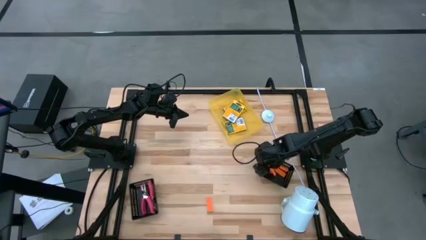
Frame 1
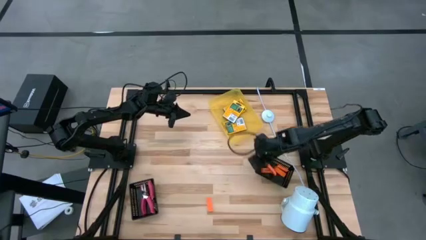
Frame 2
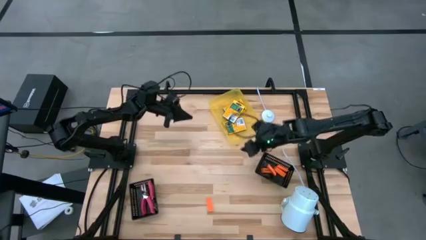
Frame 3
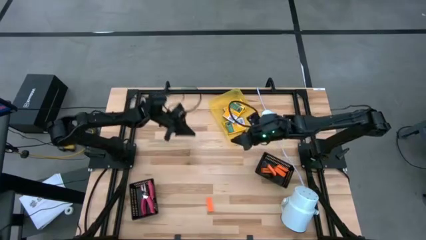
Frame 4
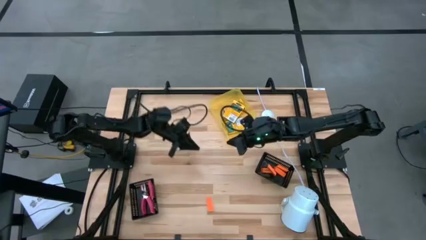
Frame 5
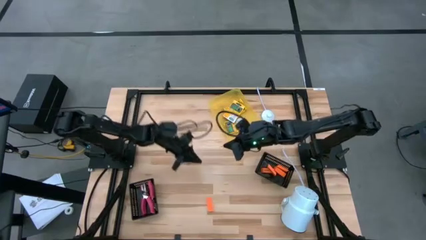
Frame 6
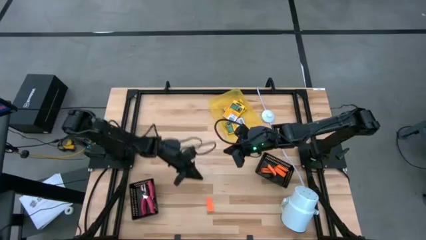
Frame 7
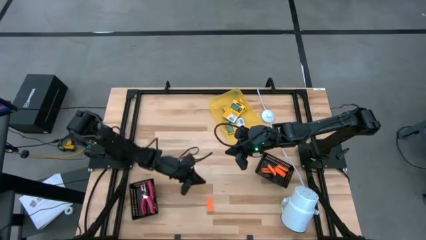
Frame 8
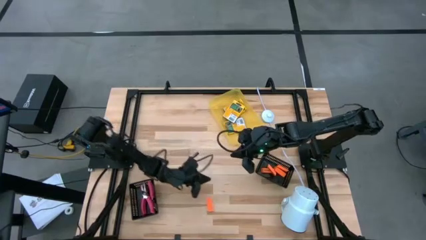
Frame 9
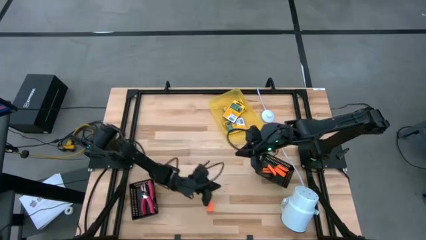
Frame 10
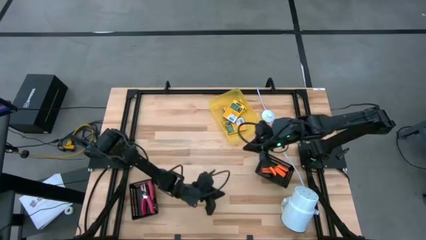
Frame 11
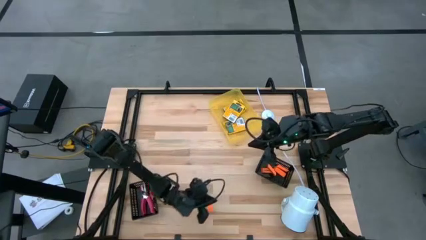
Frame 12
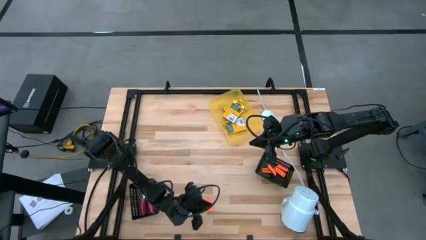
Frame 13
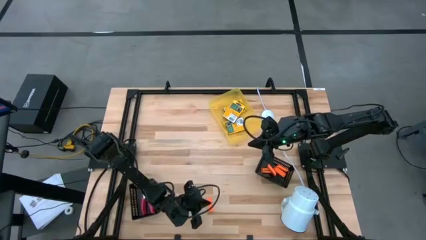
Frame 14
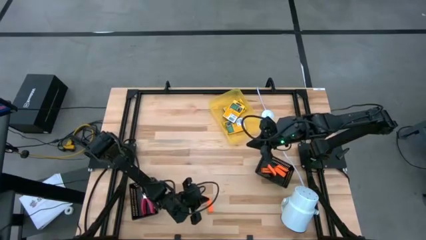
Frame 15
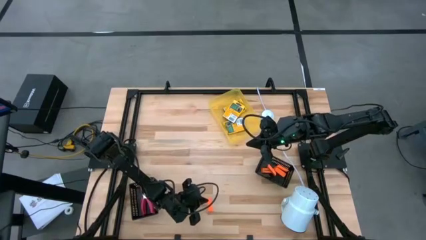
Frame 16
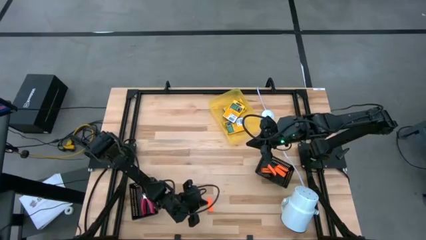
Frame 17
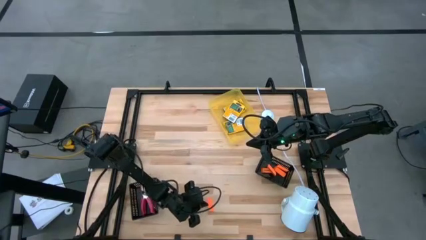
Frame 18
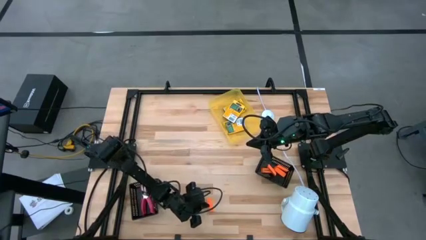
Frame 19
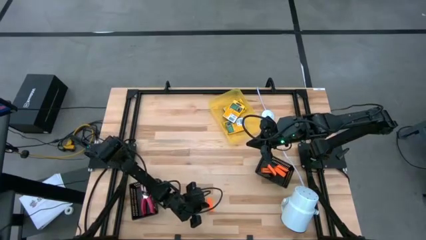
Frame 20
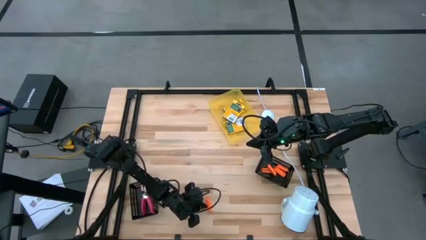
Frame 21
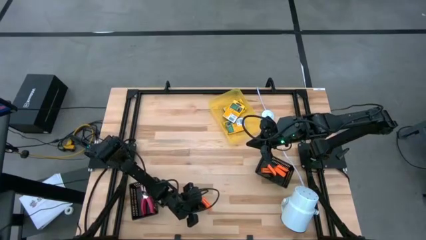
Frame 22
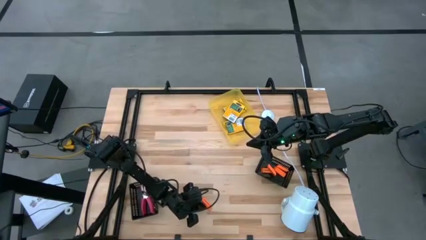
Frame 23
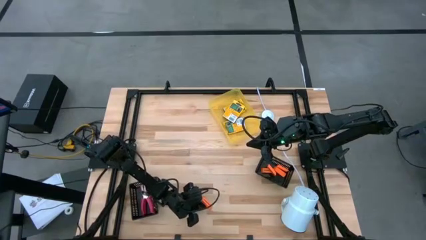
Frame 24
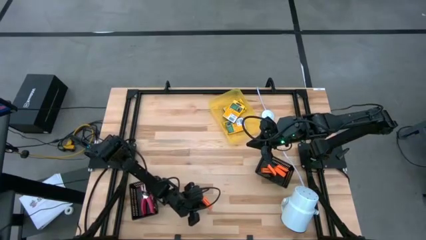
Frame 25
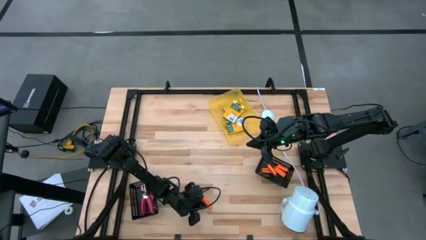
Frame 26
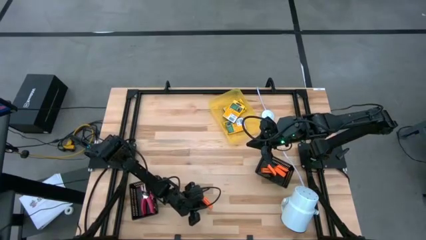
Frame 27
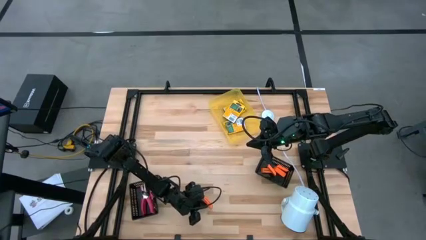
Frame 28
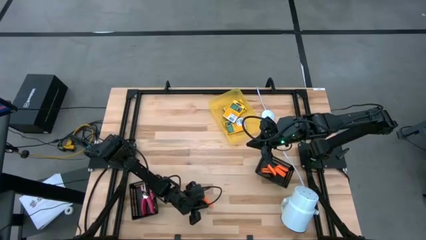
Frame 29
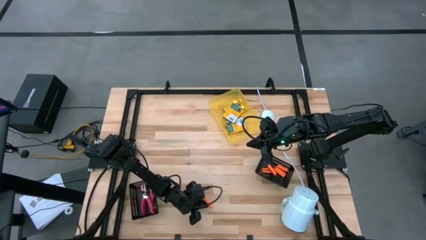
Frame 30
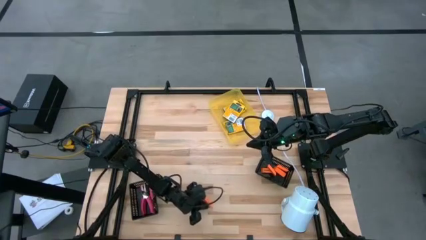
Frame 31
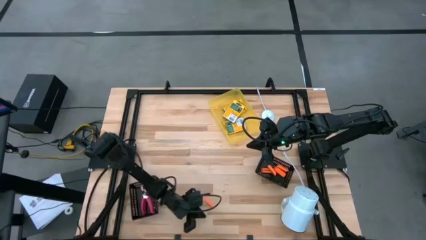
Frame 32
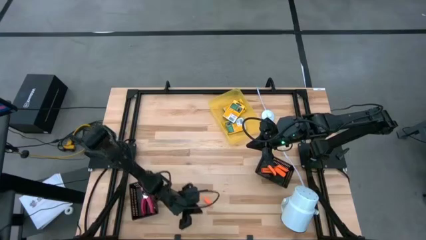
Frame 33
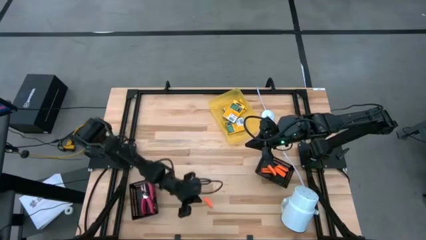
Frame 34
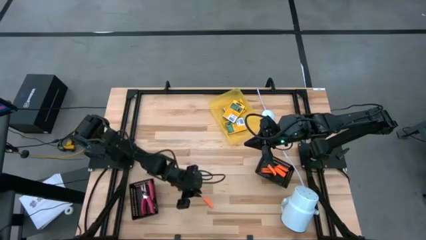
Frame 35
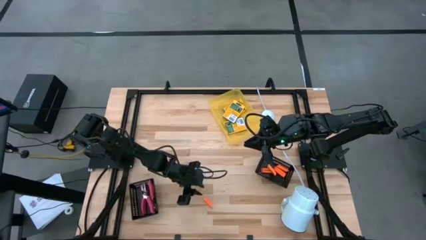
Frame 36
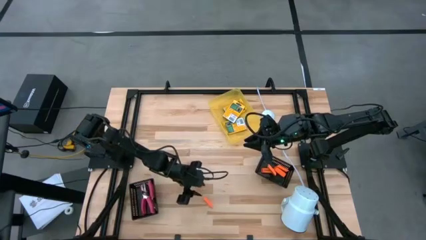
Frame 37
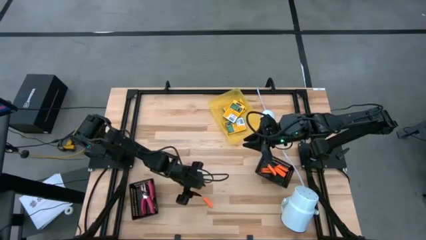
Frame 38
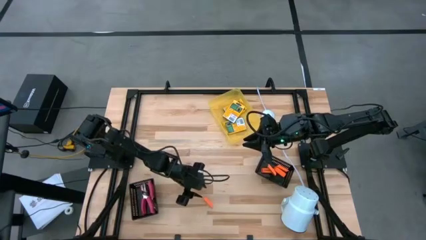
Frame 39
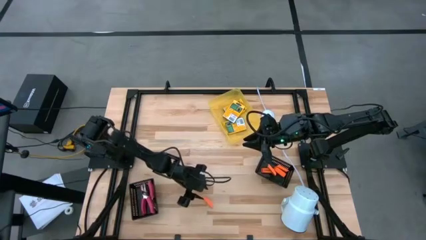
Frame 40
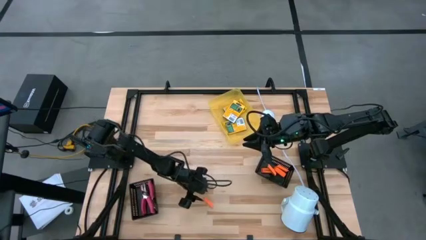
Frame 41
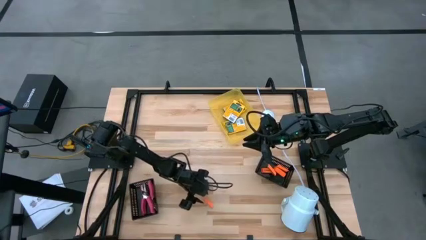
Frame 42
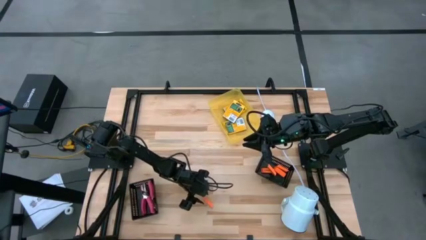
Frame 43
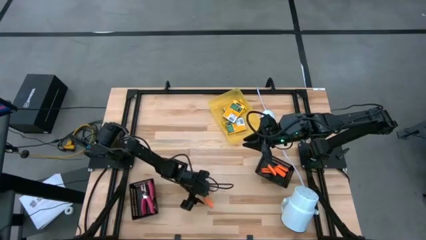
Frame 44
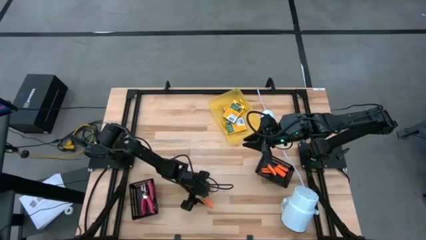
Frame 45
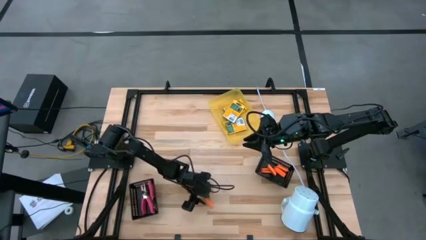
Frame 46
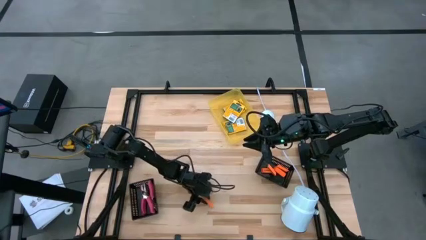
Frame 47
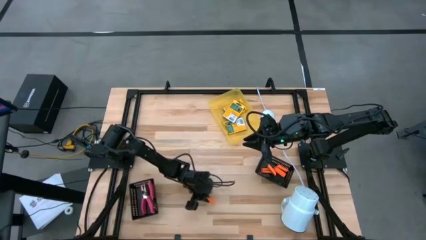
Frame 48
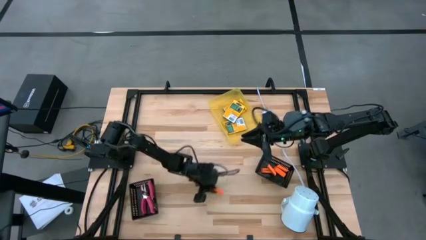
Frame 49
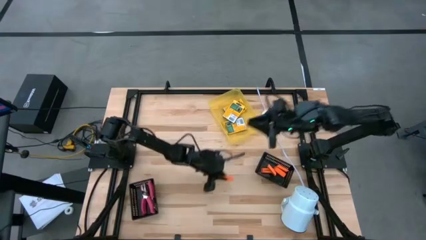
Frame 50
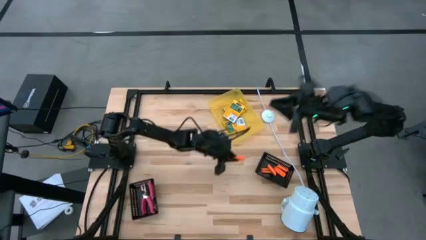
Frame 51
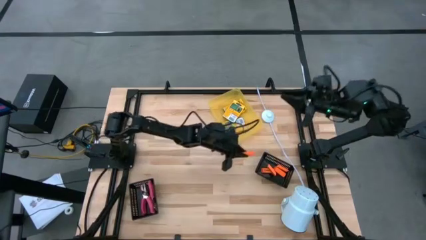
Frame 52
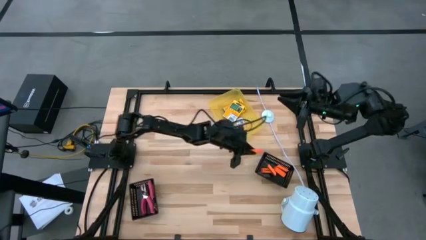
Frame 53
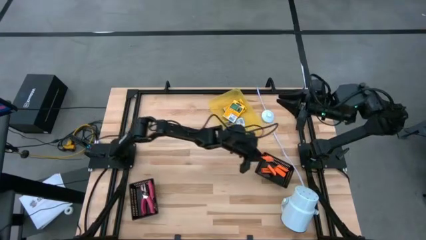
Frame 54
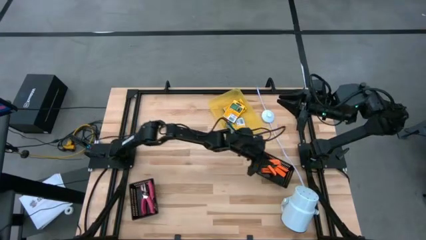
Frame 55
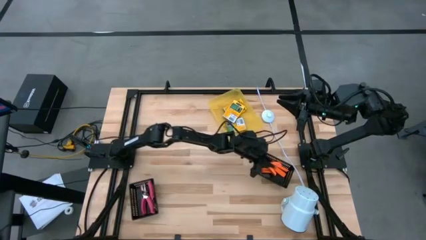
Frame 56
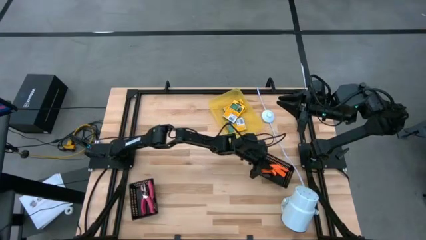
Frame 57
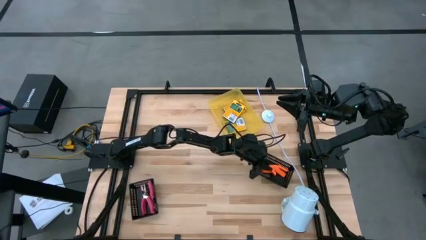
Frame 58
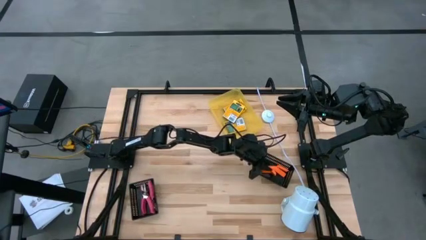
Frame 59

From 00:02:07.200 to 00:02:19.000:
Task: Pick & Place School Supplies
Put the orange eraser into the right black bin

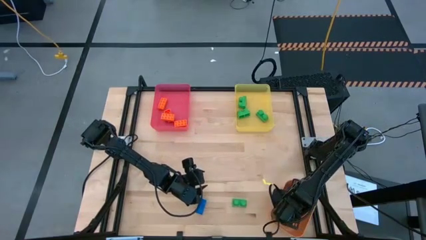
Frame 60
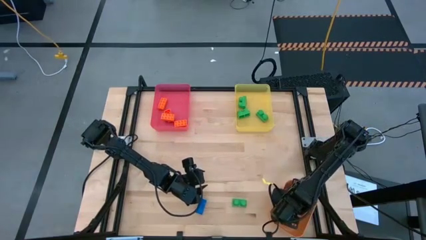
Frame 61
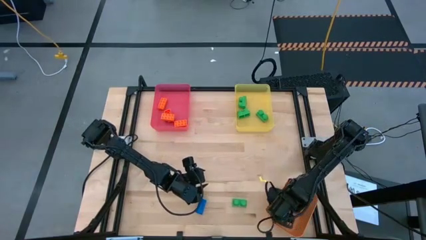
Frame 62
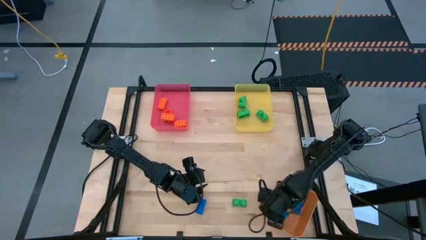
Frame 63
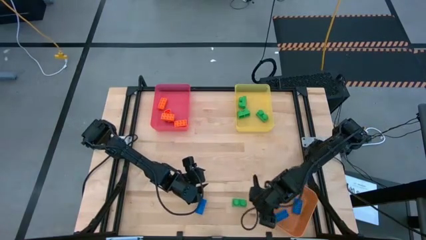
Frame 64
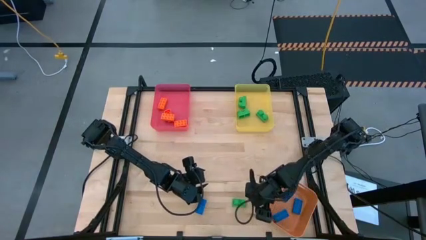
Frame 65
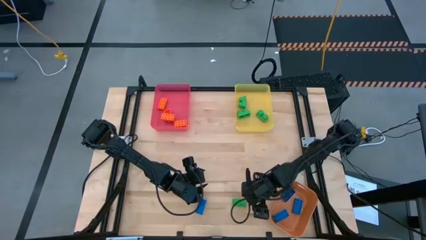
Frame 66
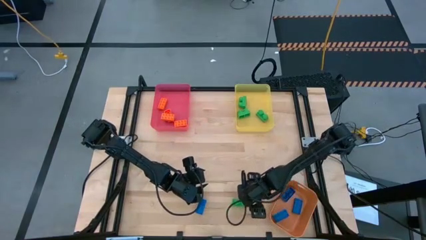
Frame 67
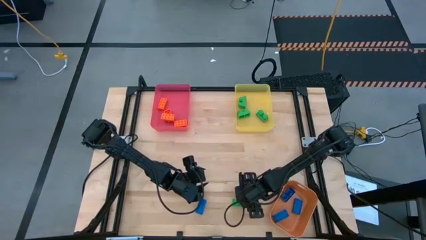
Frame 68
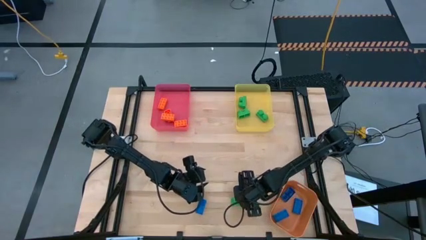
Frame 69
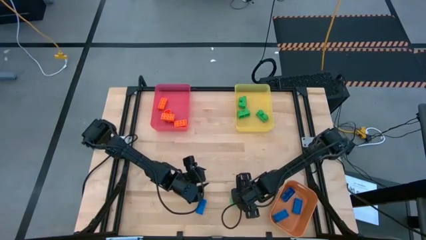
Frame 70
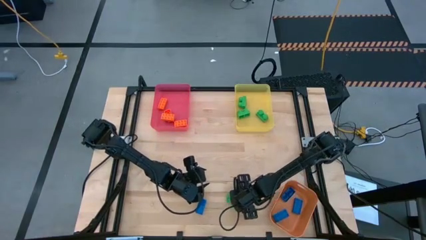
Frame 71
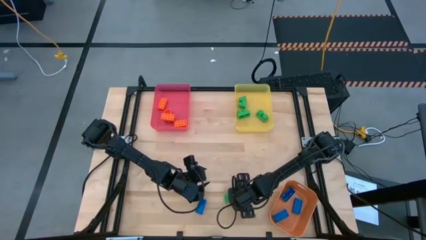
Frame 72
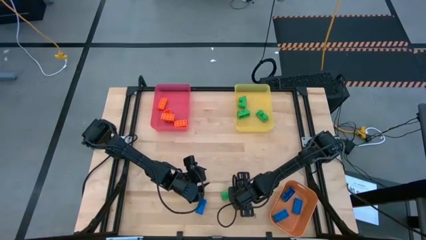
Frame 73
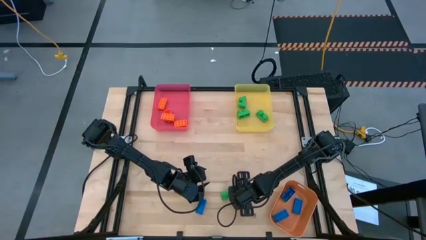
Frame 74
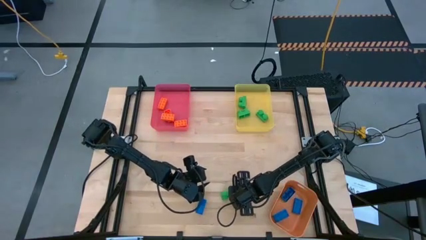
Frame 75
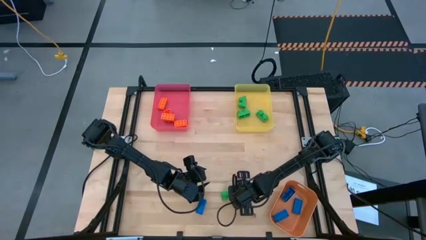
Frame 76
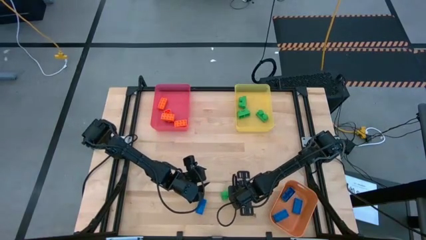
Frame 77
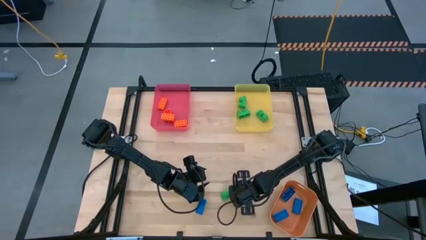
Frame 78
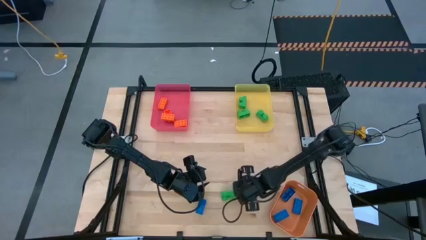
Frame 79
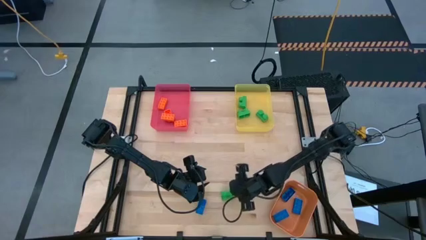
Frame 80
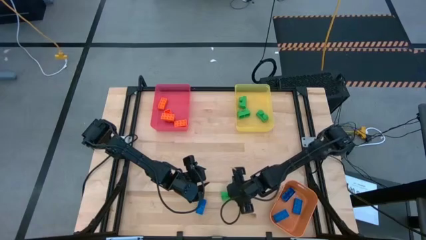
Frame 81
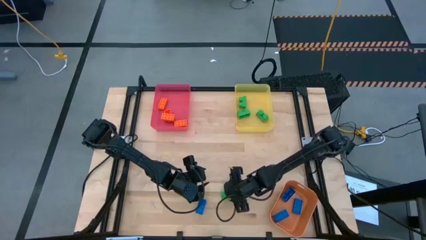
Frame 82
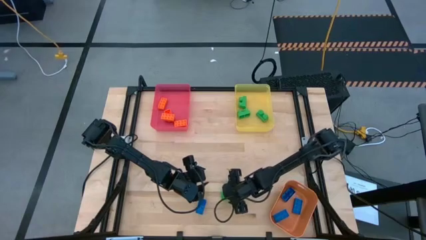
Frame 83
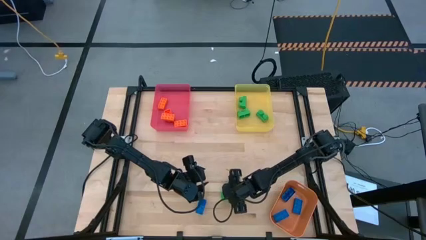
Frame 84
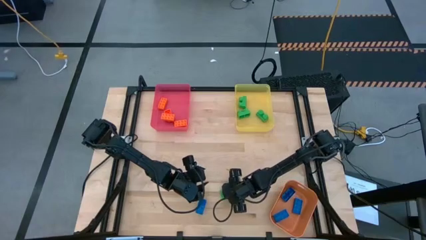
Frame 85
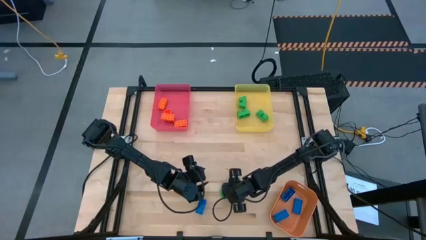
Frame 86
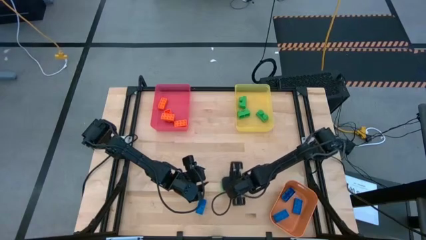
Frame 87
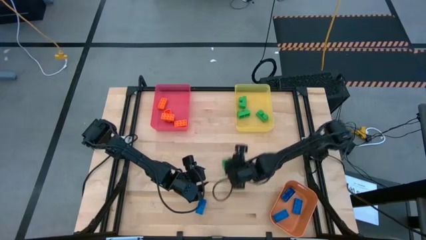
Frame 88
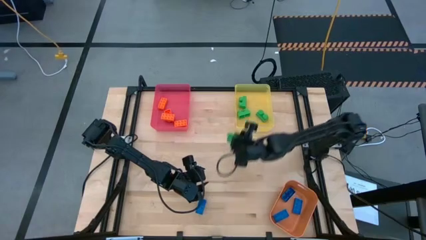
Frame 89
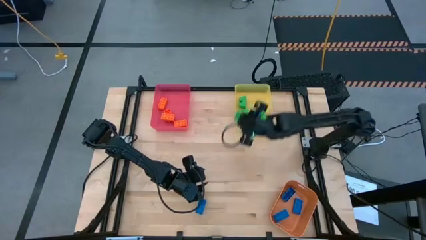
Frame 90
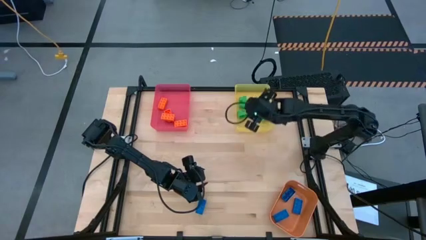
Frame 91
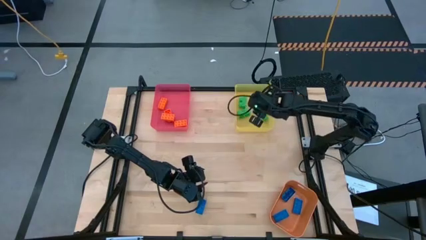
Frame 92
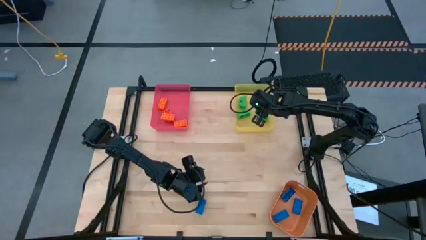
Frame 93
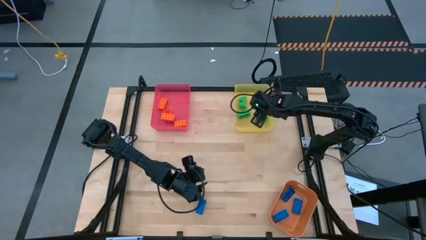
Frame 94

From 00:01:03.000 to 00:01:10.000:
Task: Sort & place blocks by color
Put the green game piece into the yellow bin
